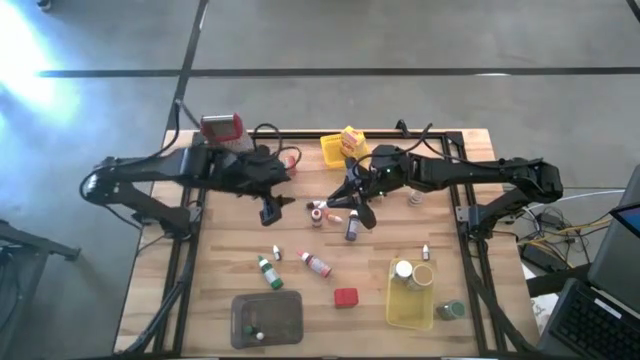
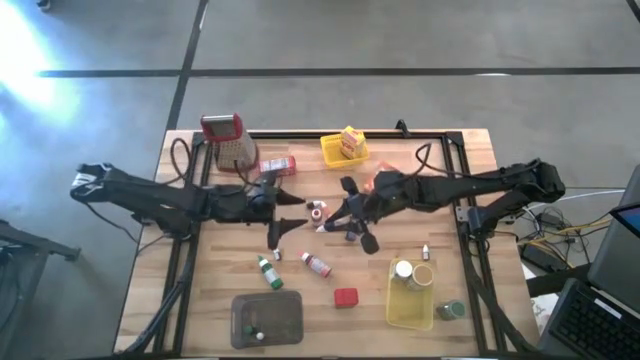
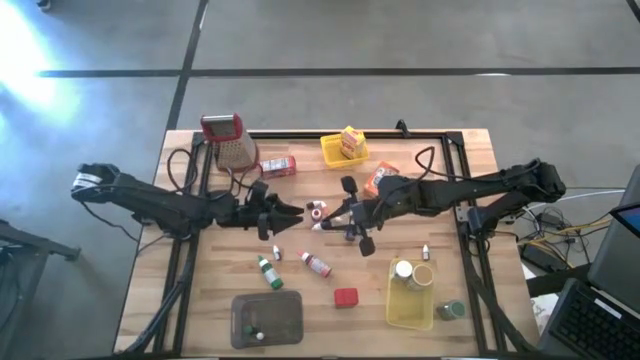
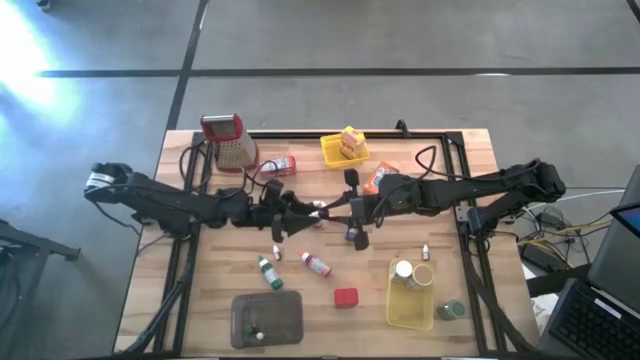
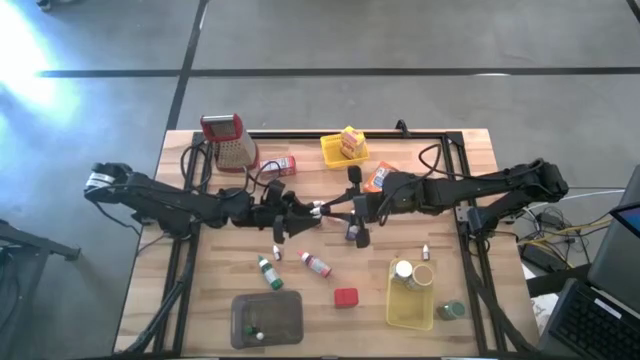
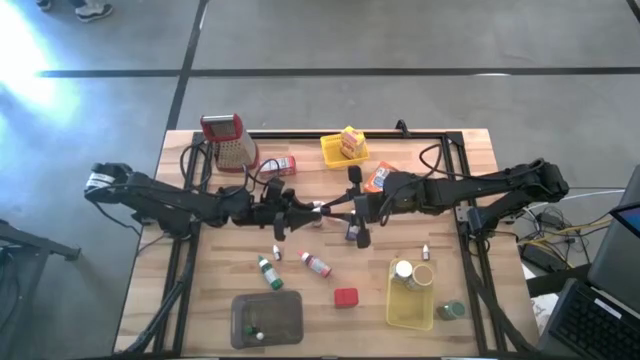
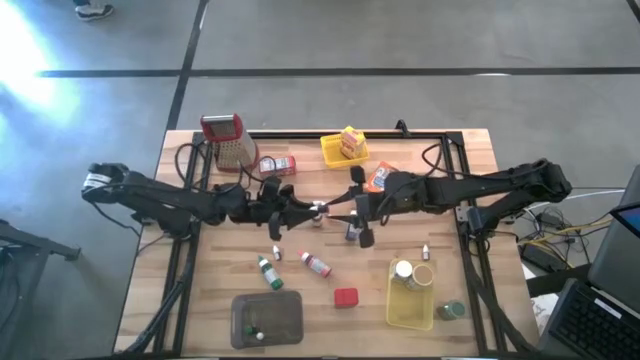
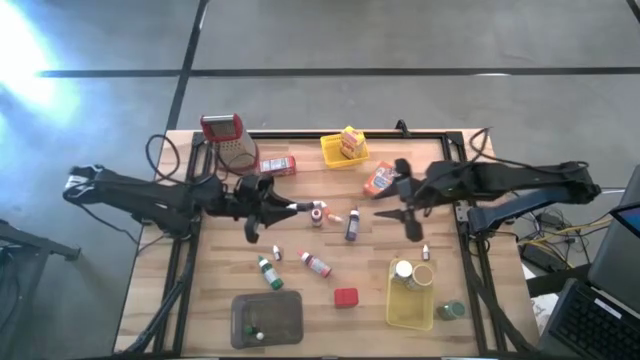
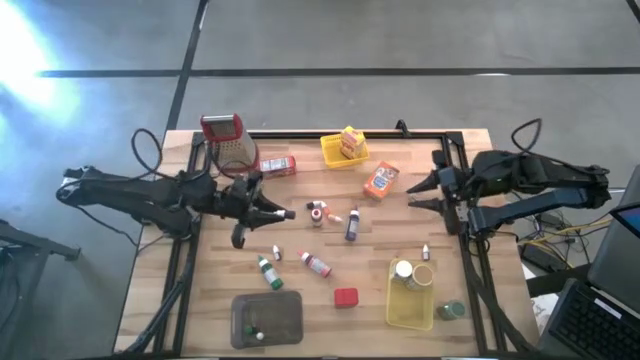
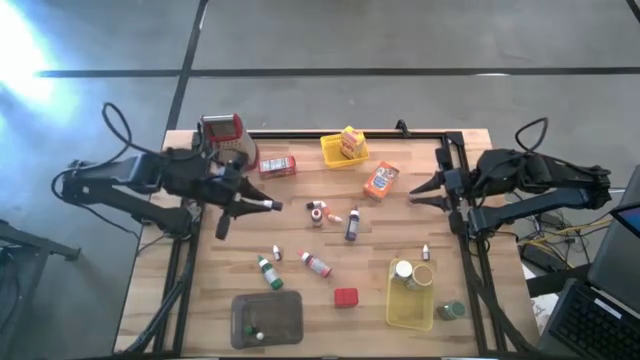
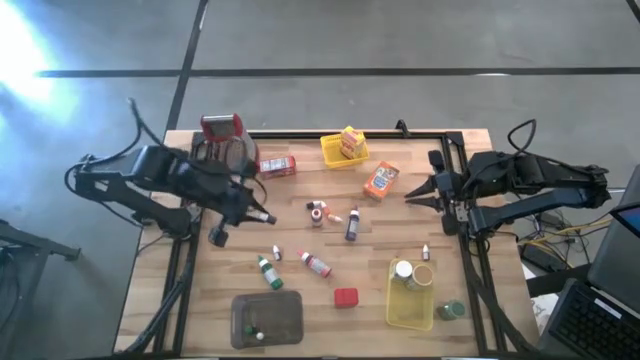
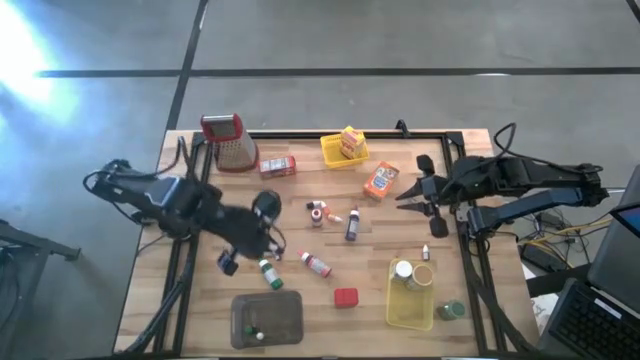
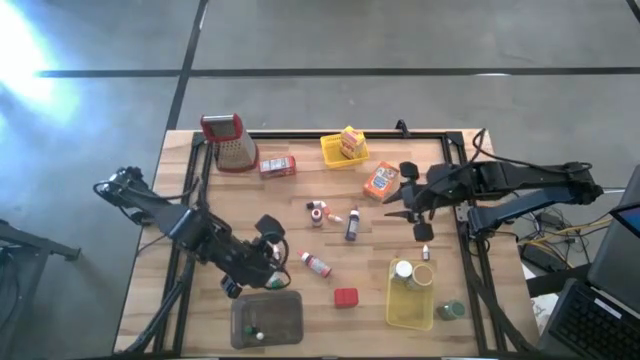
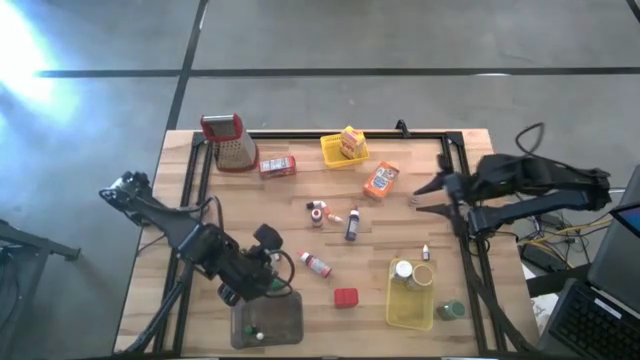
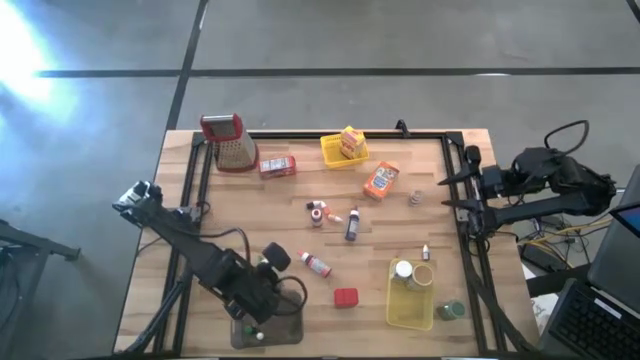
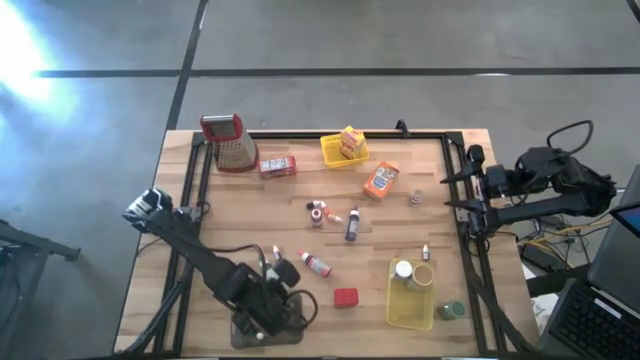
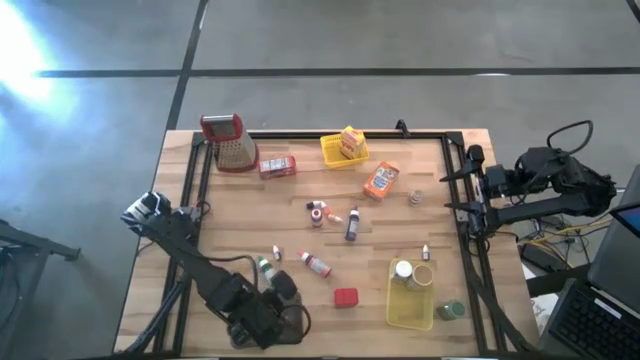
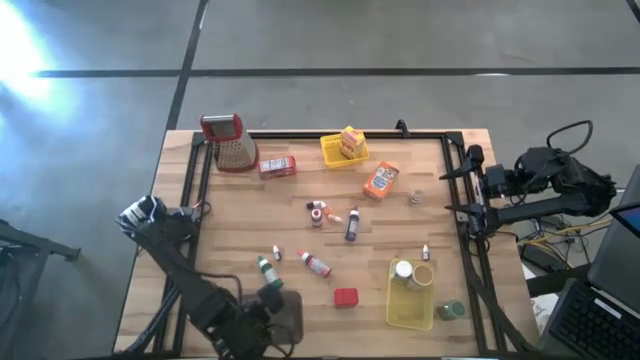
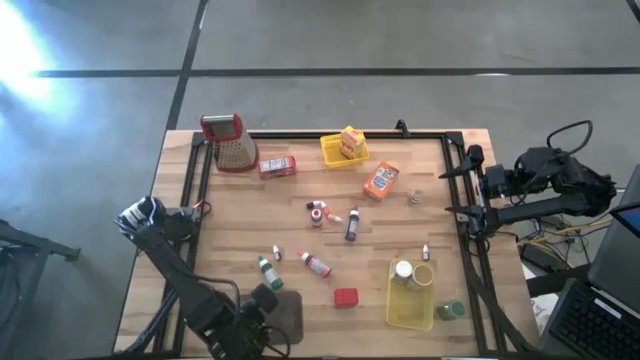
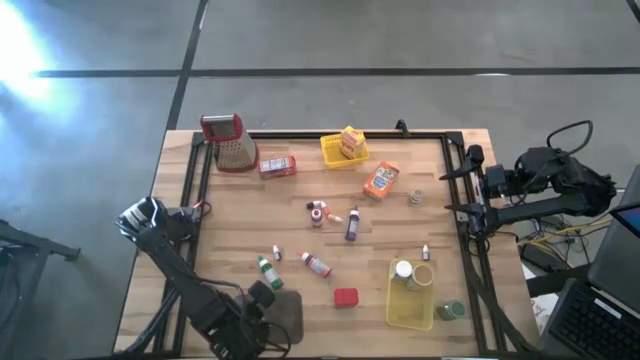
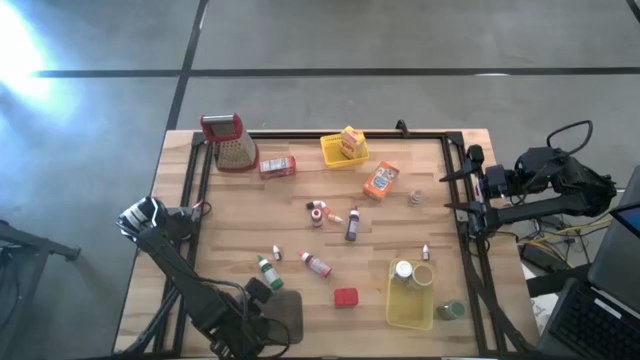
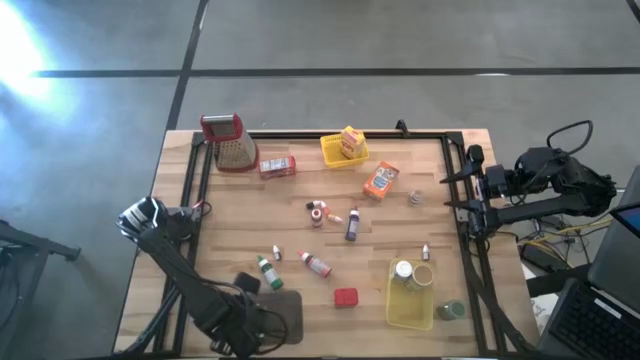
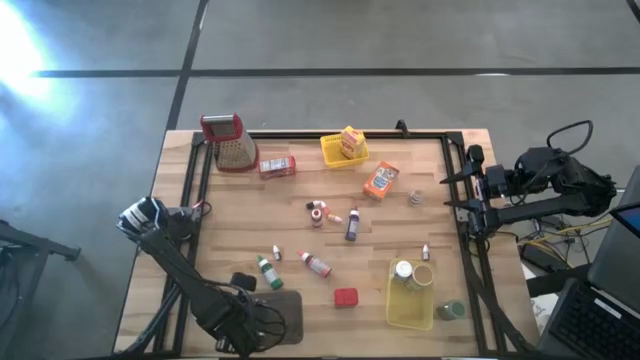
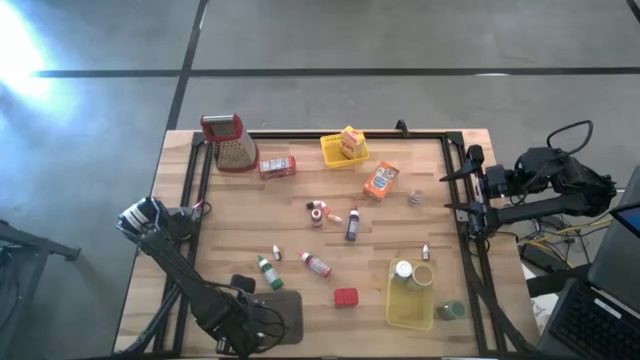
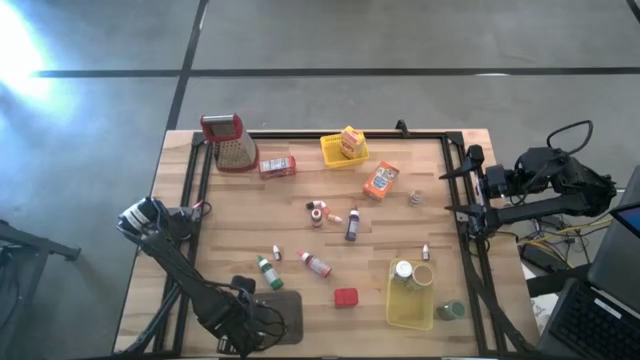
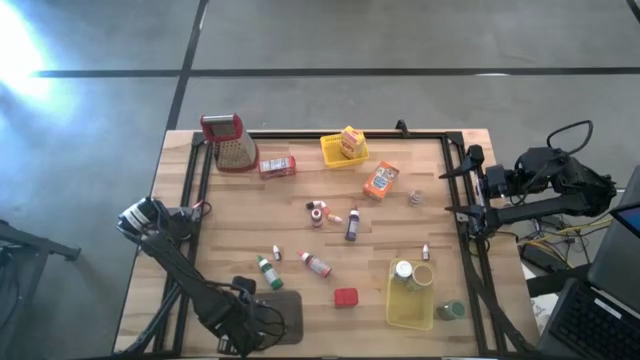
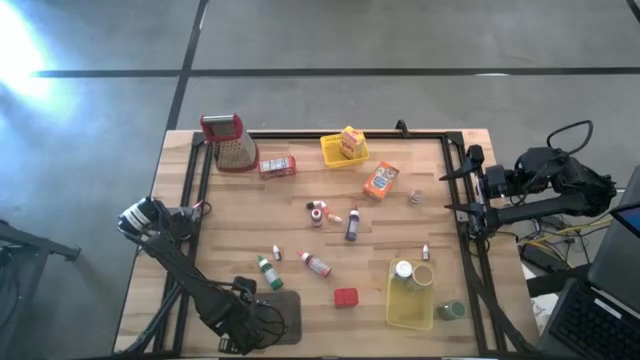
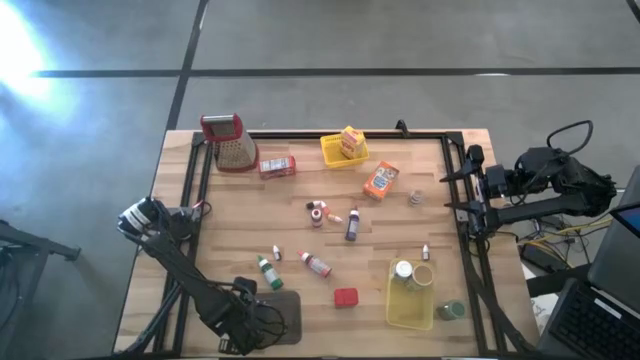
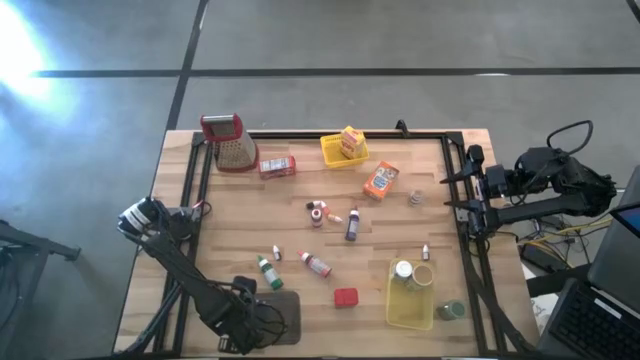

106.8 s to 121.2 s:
Task: Pick & Place Kitchen Items
Put the small violet food coloring bottle into the black bin

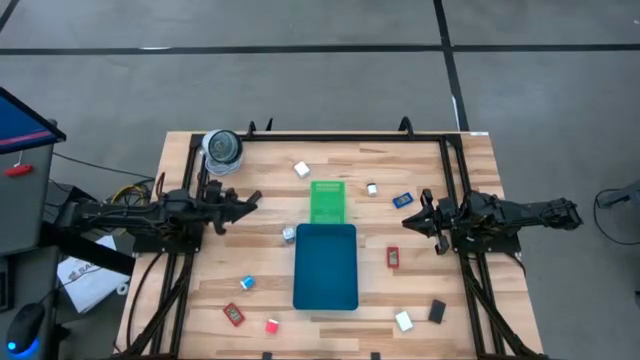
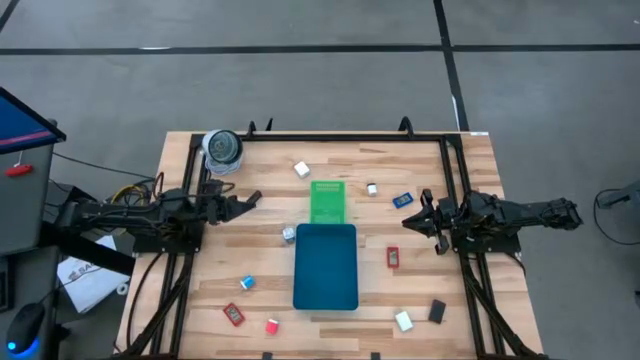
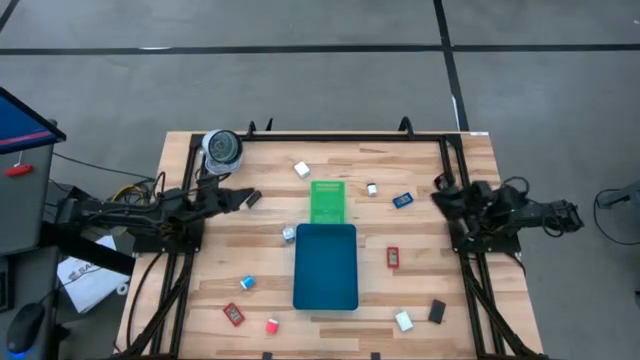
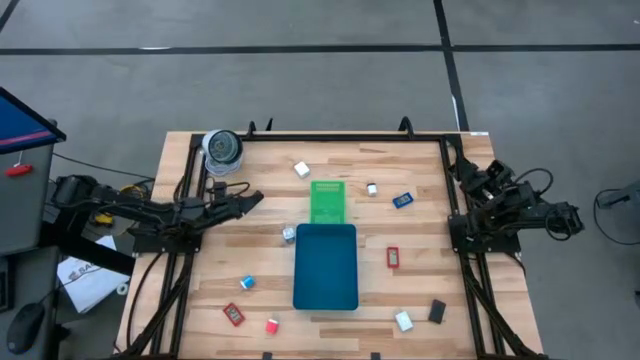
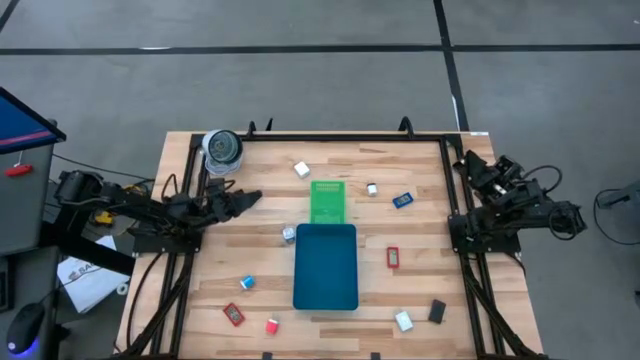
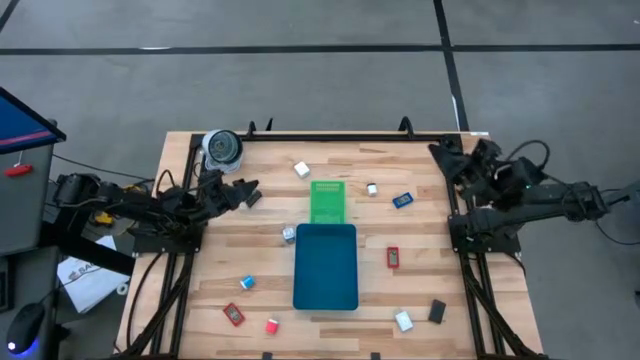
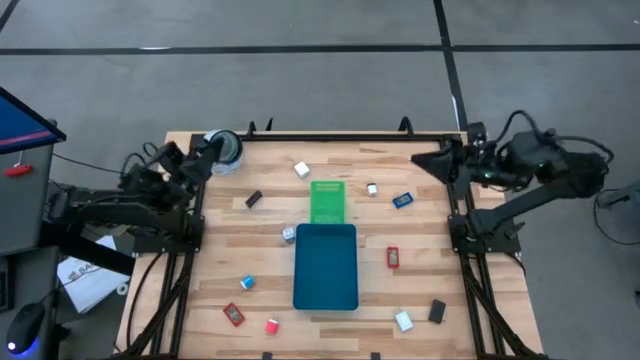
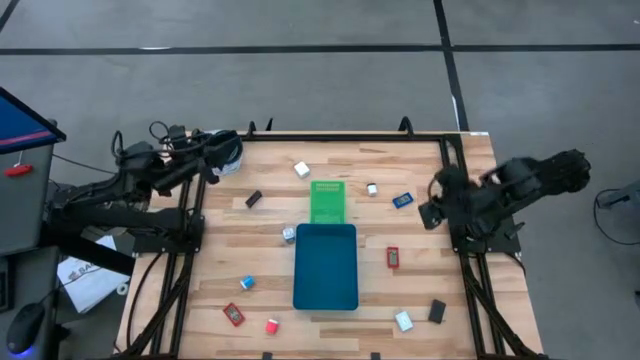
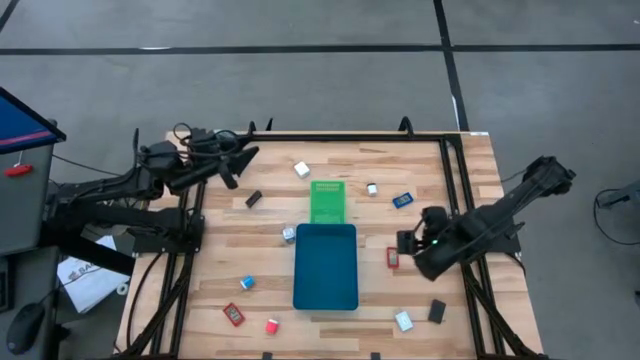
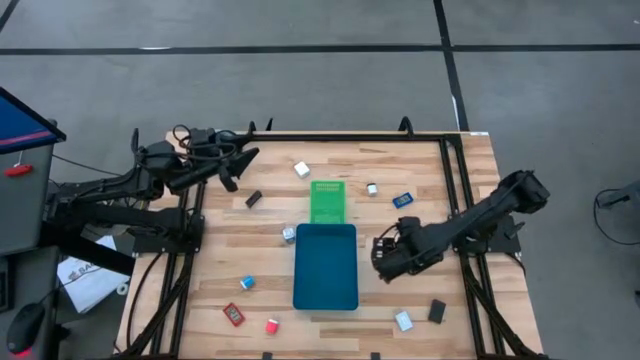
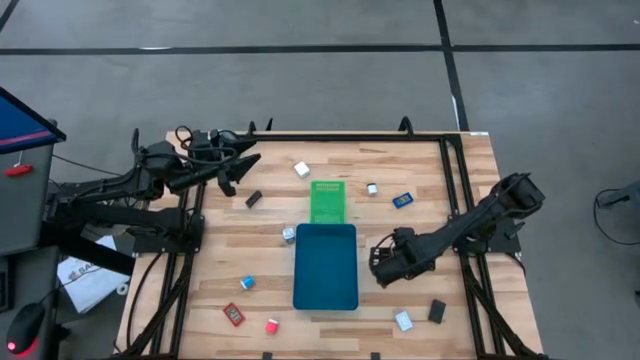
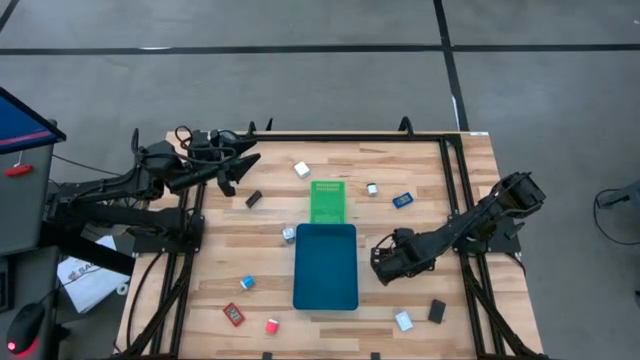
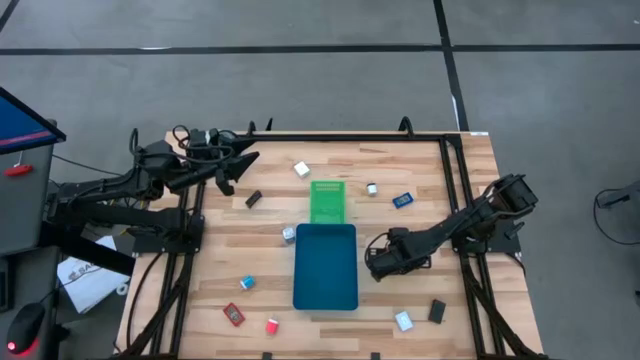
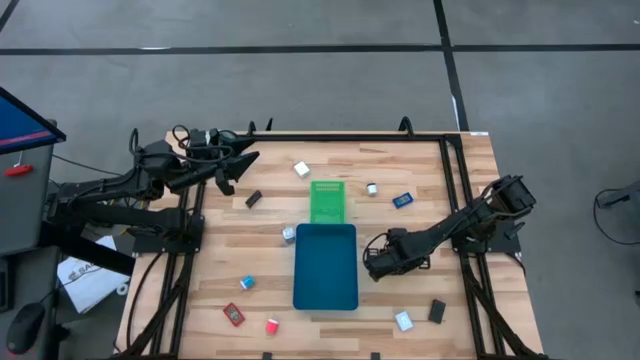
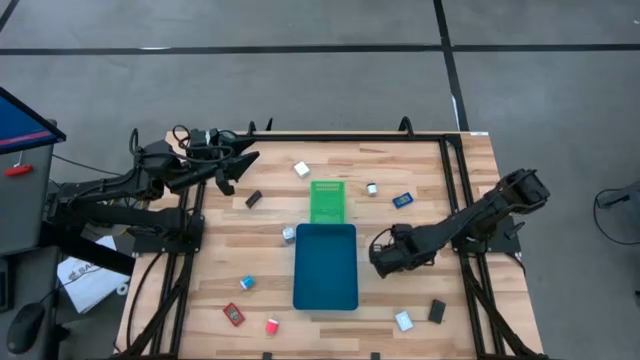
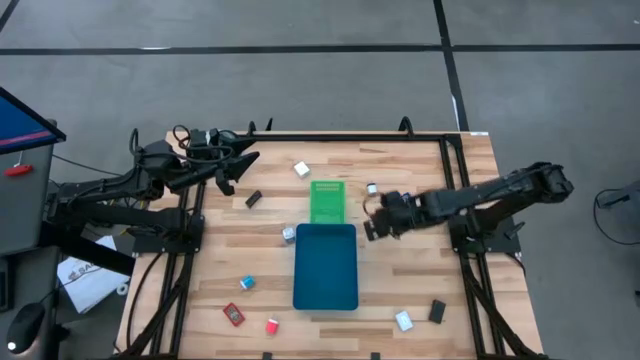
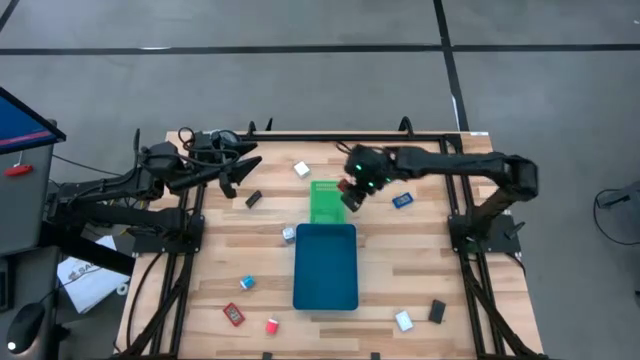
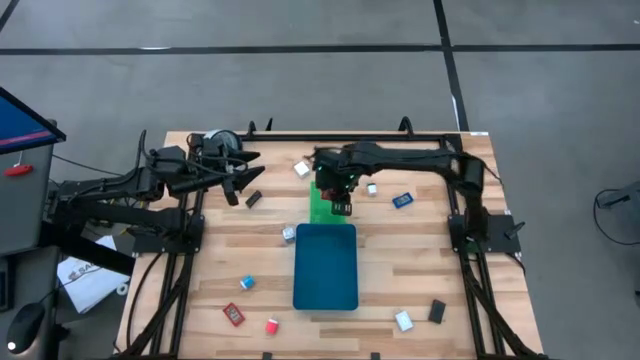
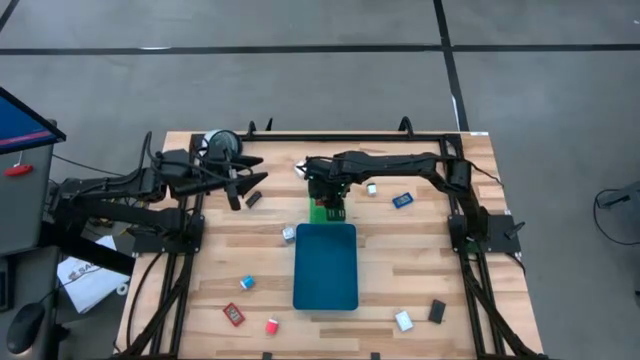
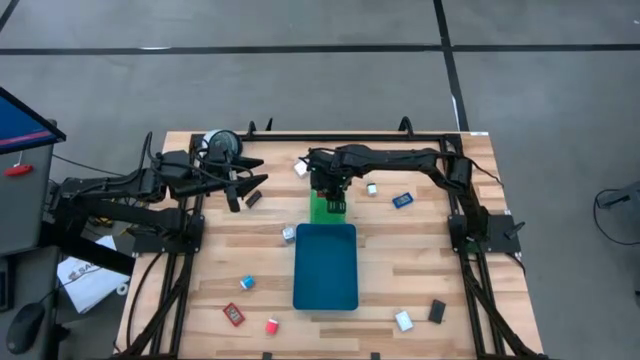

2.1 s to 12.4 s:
Task: Pick & Place Office items
Put the top red digital clock into the green bin
